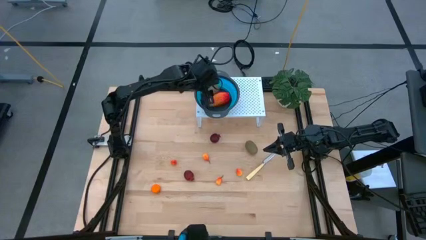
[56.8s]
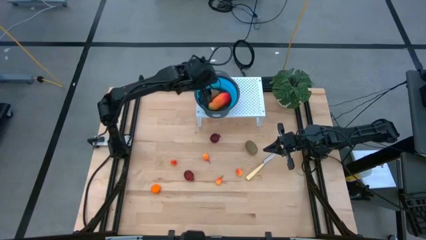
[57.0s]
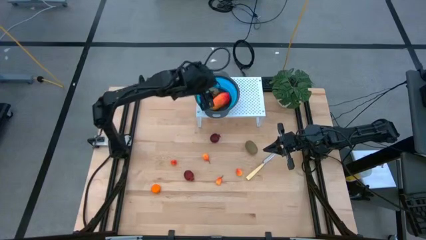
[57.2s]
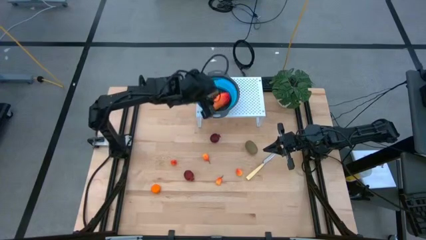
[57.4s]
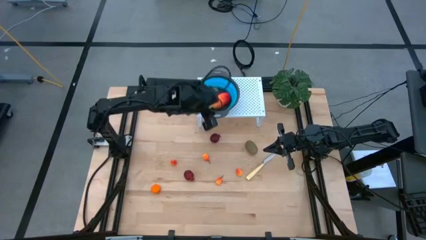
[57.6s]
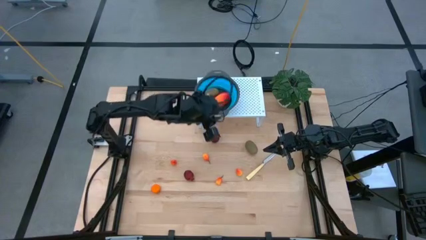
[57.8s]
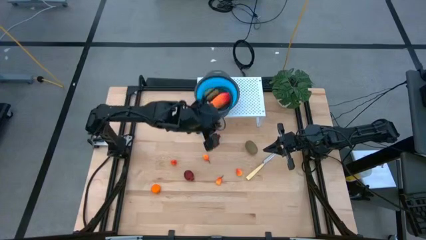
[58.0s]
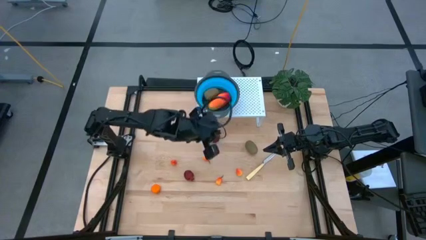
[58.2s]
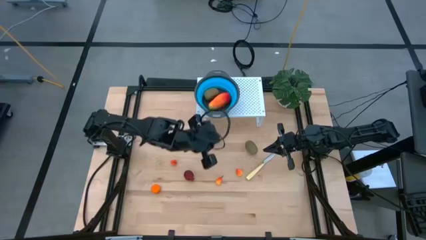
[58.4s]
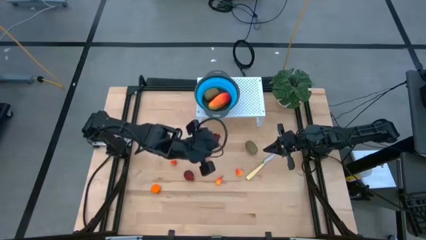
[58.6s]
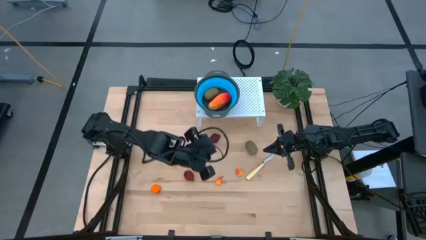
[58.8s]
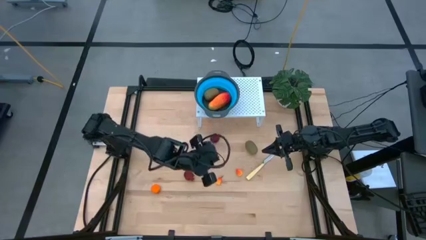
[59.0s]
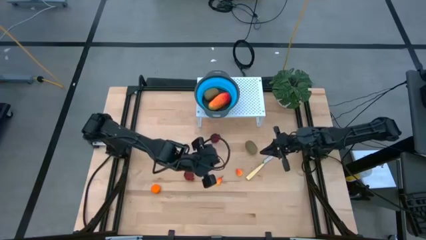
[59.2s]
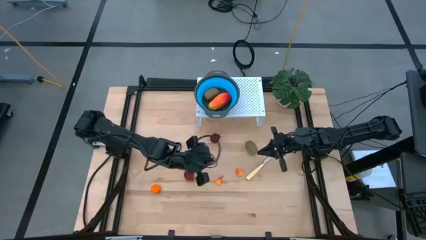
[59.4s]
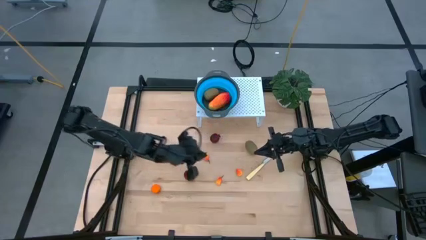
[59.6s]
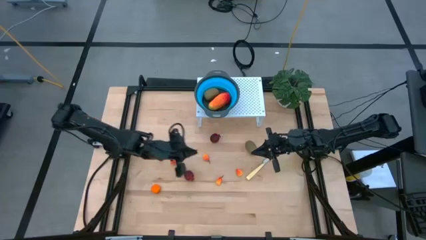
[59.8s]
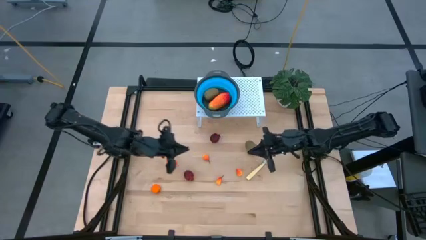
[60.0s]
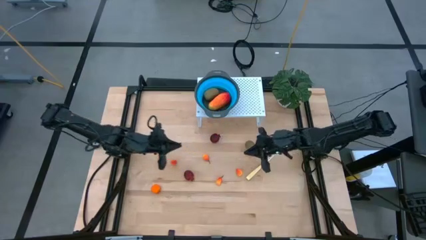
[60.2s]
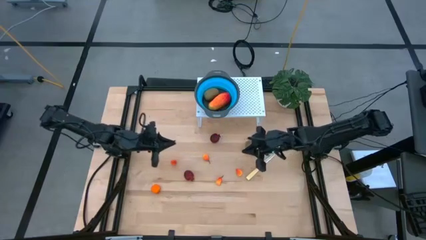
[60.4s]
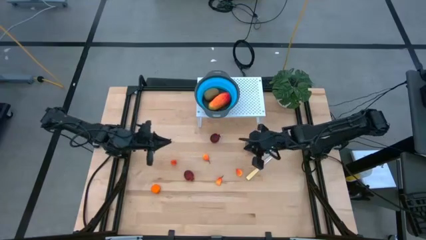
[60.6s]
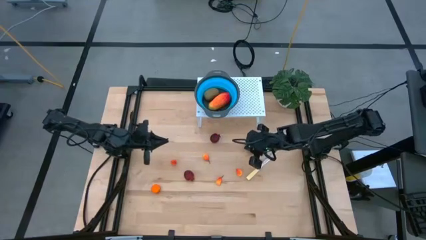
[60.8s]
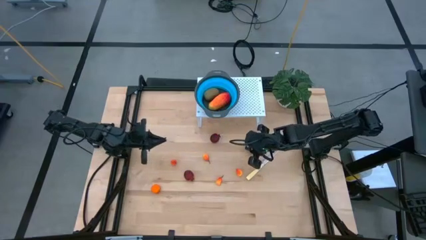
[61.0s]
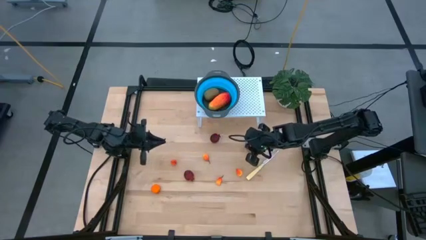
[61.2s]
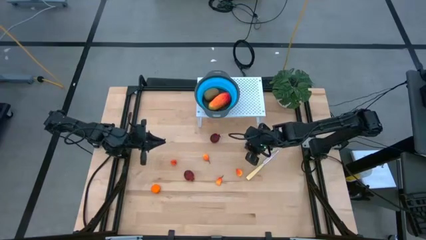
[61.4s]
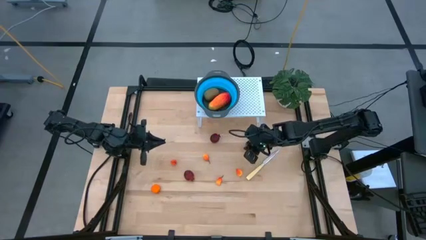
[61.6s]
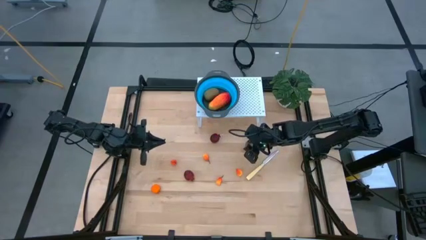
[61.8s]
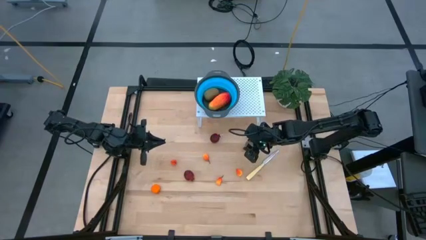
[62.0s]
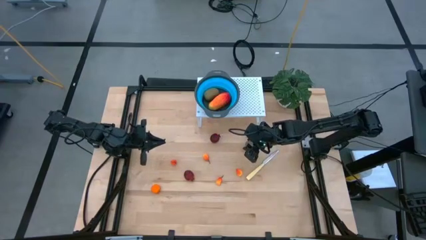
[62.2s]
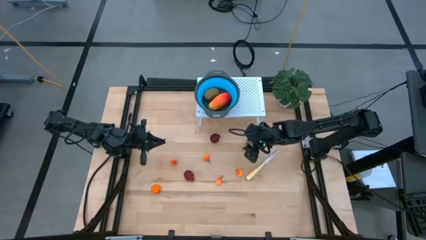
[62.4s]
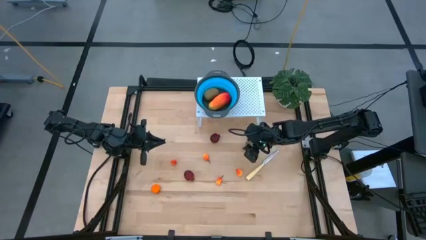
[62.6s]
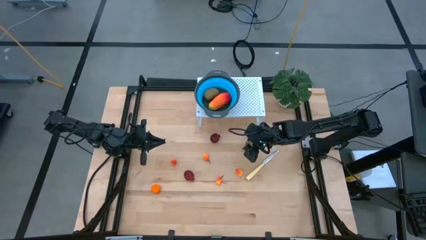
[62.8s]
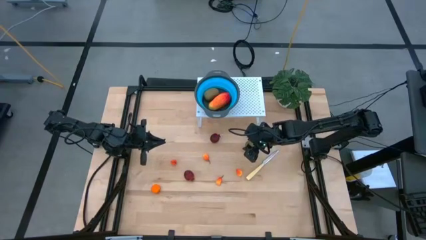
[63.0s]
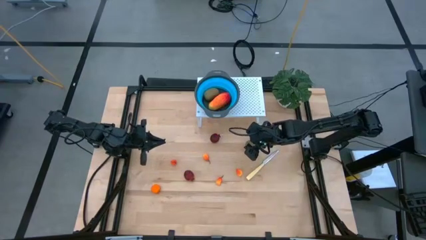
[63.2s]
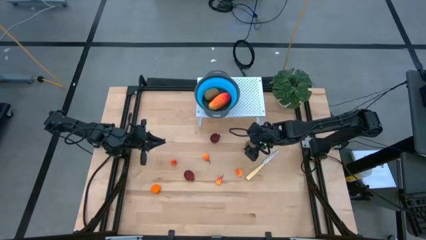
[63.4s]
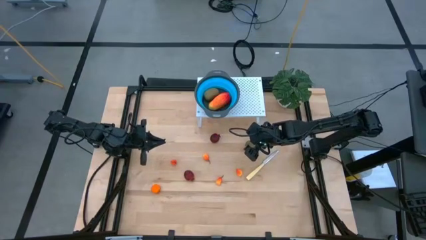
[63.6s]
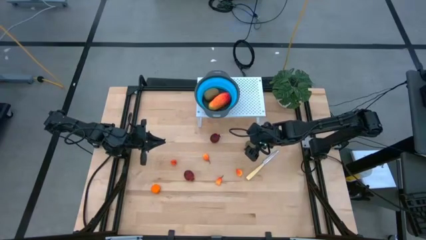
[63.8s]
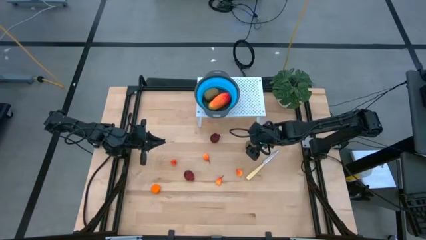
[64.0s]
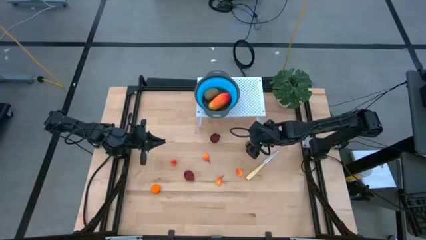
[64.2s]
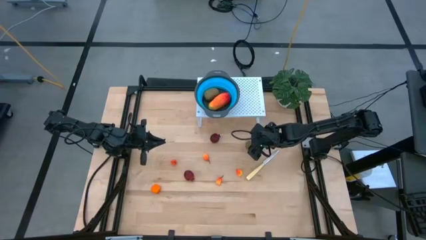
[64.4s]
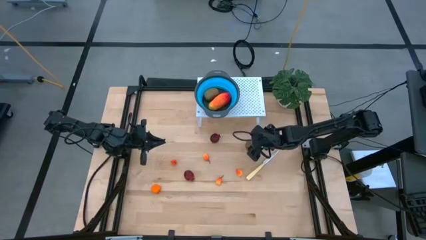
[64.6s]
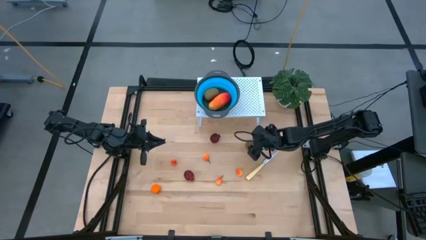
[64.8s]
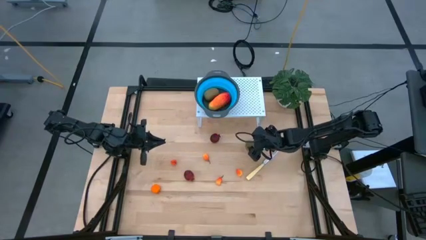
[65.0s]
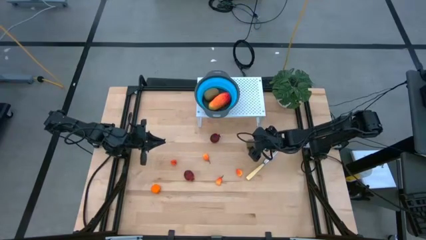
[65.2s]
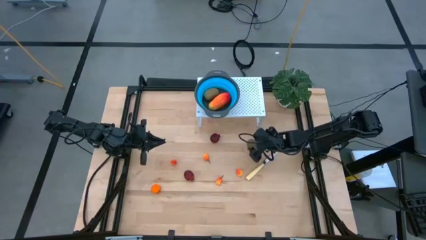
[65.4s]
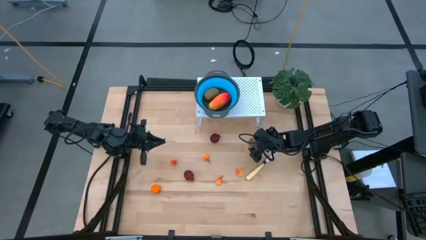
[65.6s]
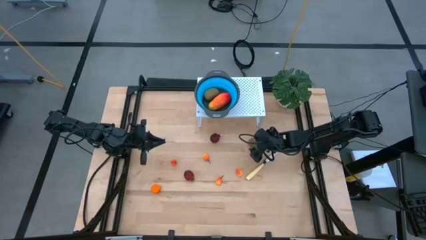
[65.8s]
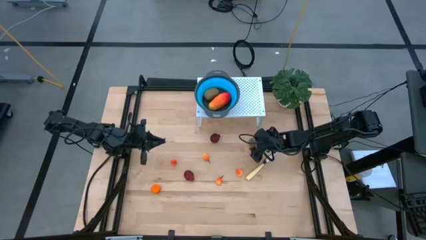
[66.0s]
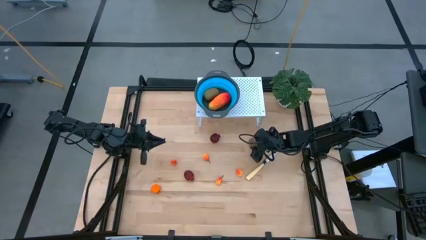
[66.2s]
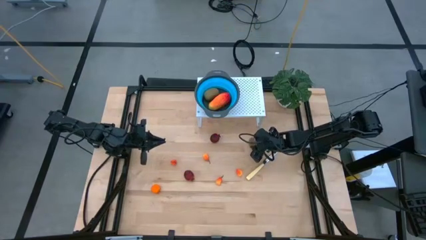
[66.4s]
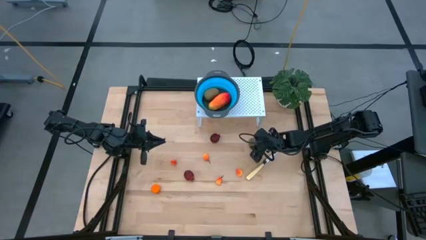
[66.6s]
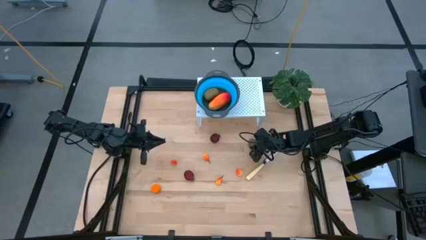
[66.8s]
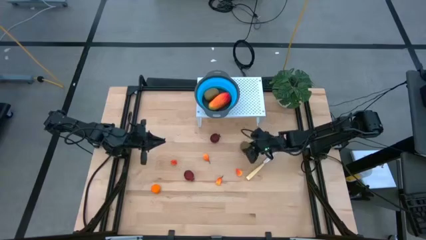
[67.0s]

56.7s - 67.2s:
Task: Pick & Place Fruit
Put the kiwi into the blue strainer bowl on the shelf
